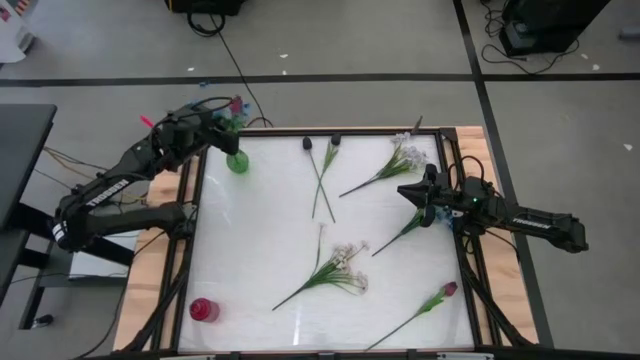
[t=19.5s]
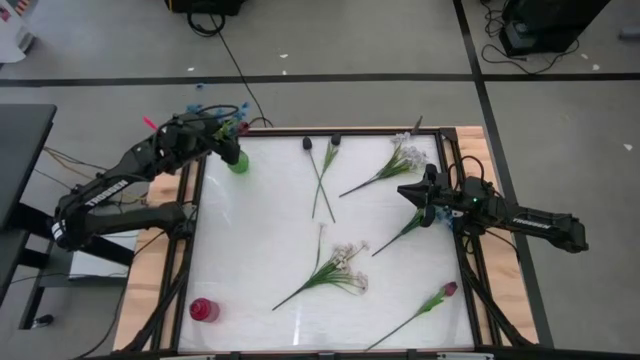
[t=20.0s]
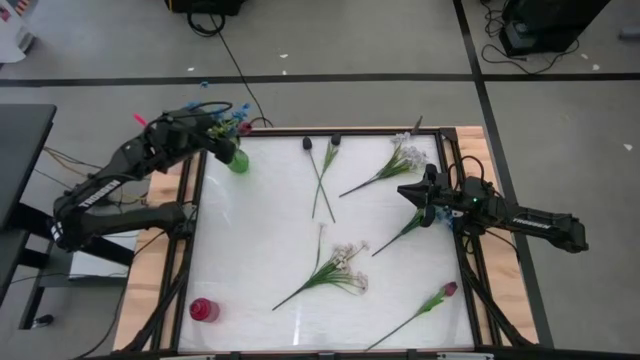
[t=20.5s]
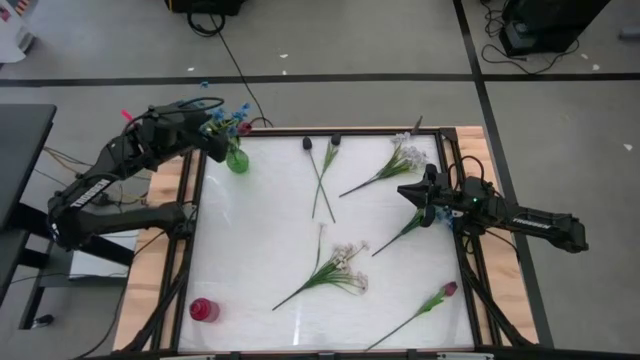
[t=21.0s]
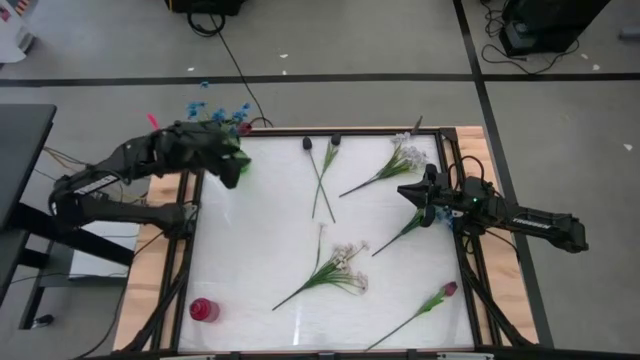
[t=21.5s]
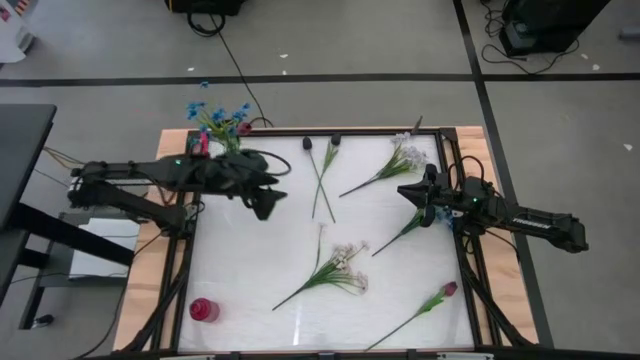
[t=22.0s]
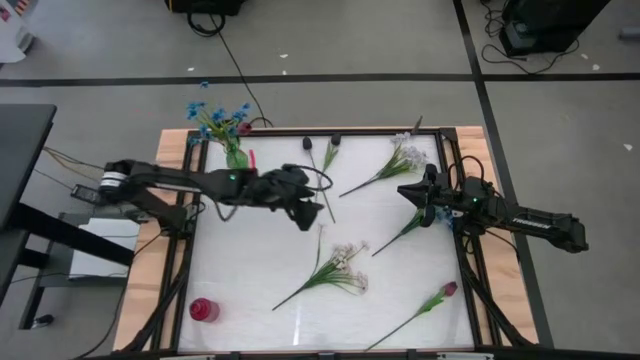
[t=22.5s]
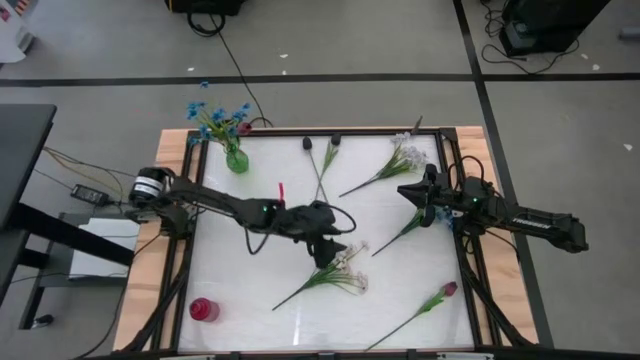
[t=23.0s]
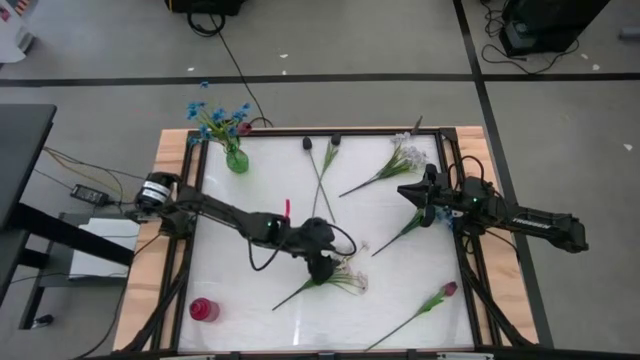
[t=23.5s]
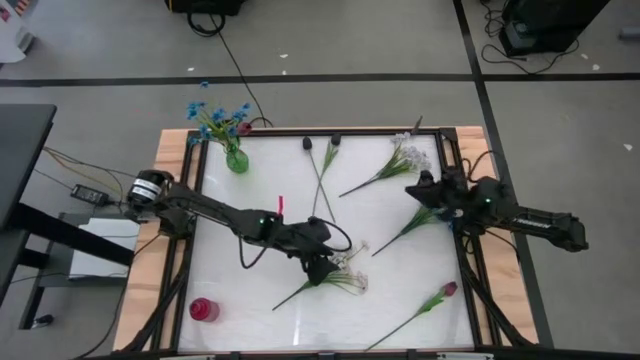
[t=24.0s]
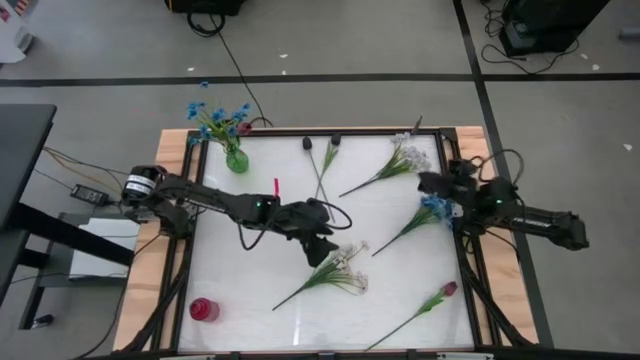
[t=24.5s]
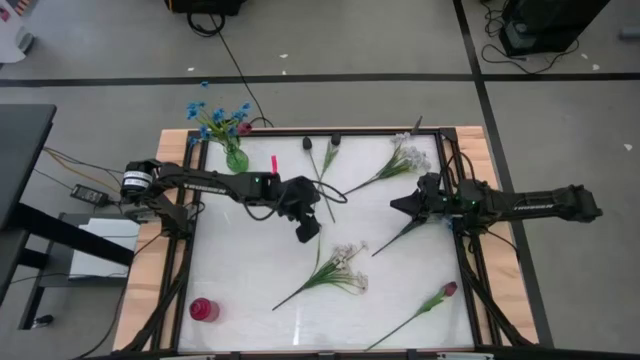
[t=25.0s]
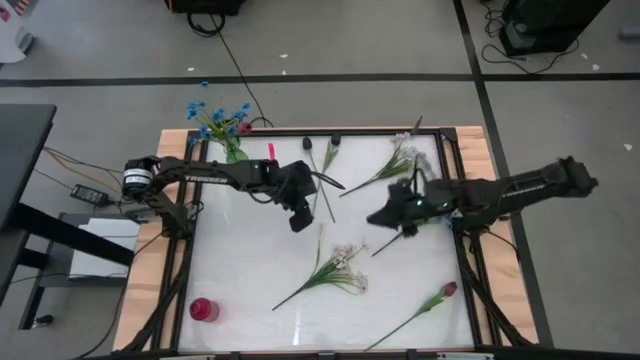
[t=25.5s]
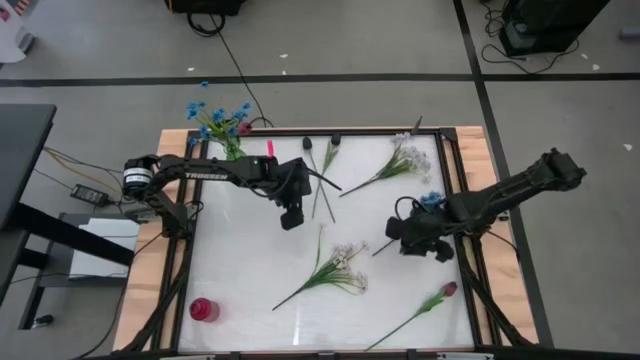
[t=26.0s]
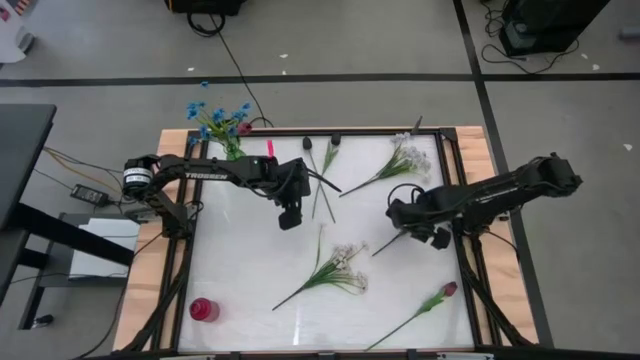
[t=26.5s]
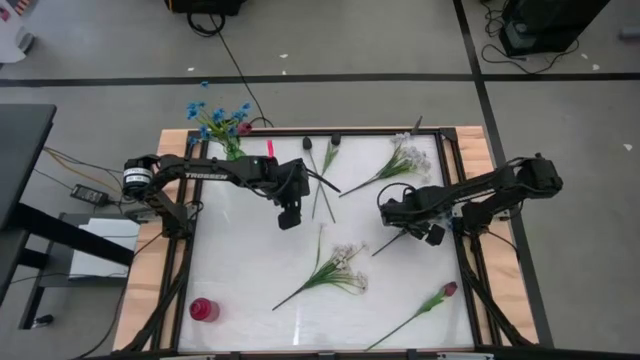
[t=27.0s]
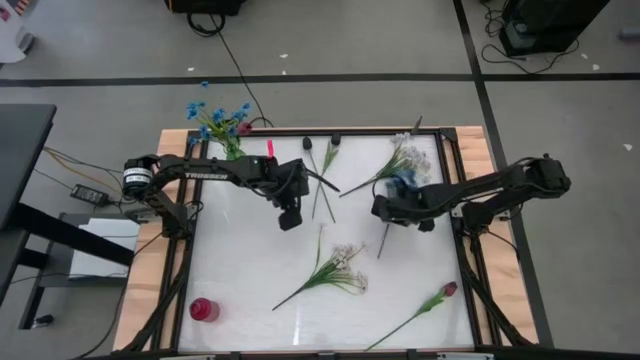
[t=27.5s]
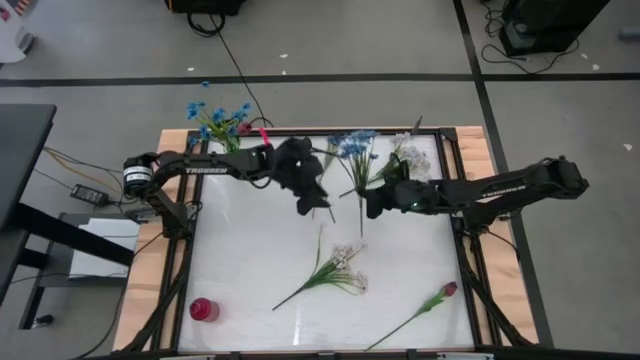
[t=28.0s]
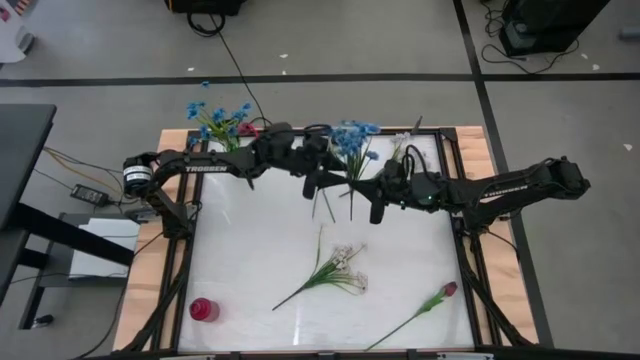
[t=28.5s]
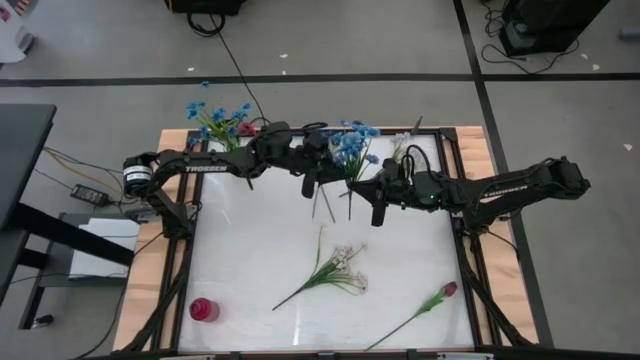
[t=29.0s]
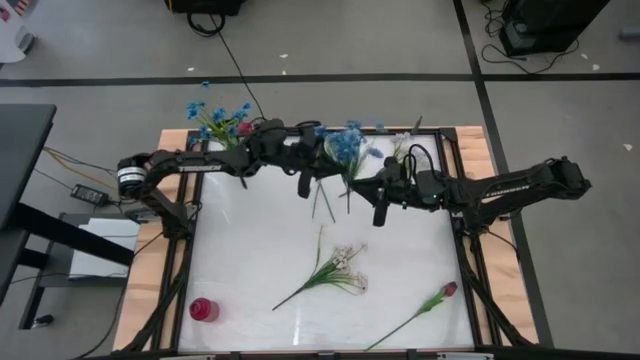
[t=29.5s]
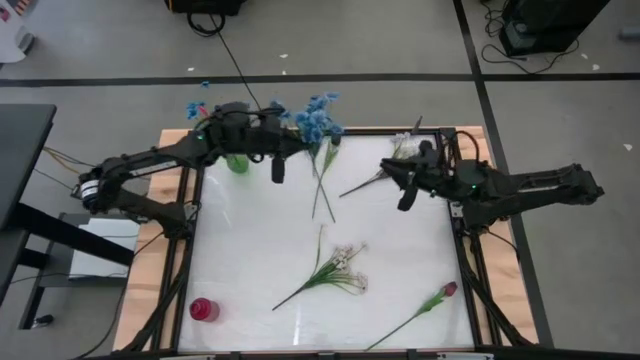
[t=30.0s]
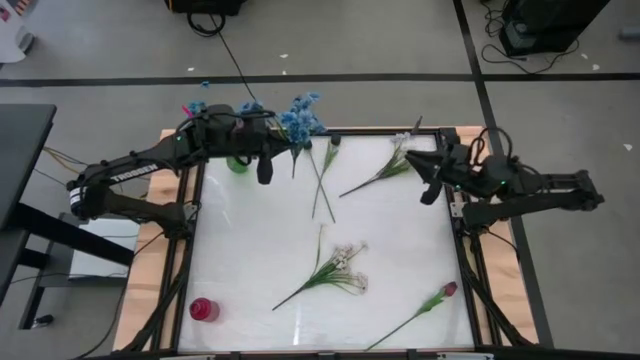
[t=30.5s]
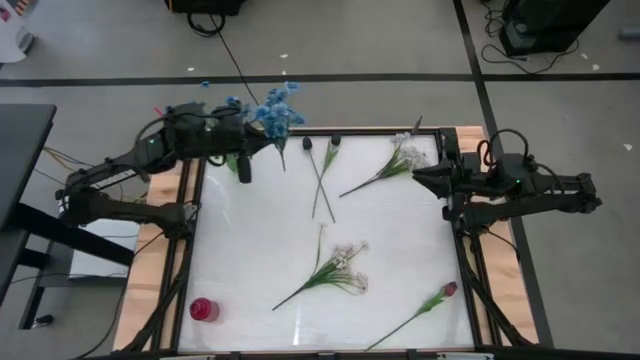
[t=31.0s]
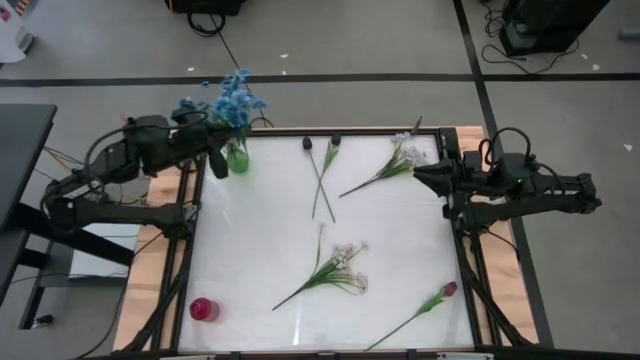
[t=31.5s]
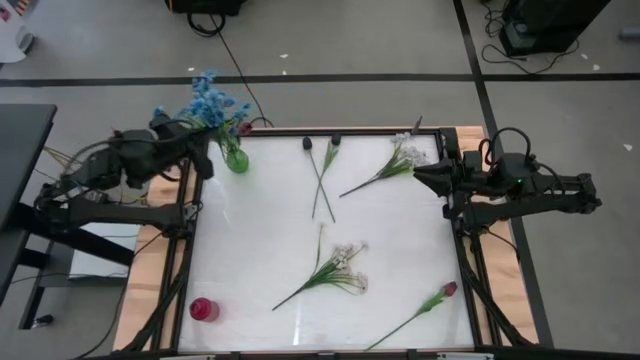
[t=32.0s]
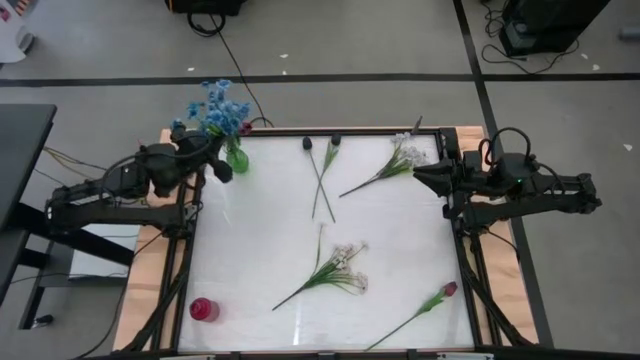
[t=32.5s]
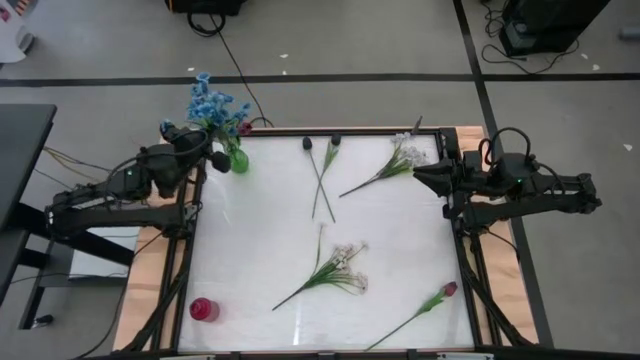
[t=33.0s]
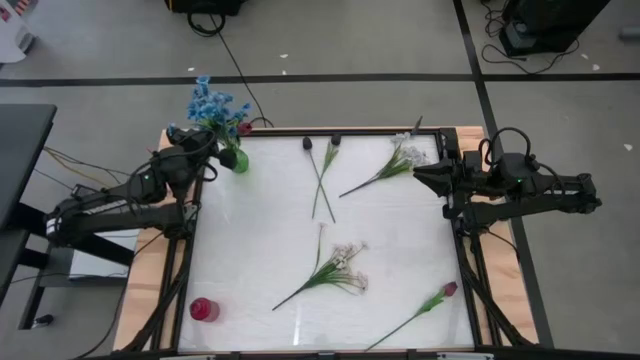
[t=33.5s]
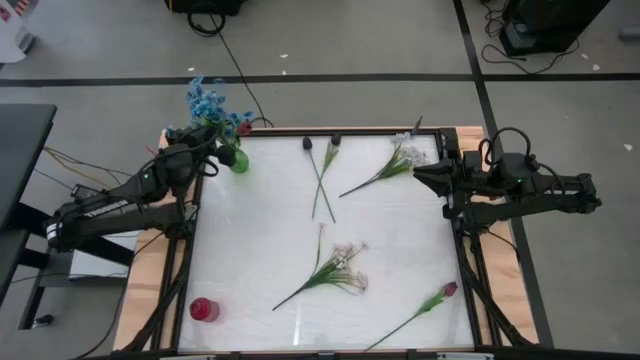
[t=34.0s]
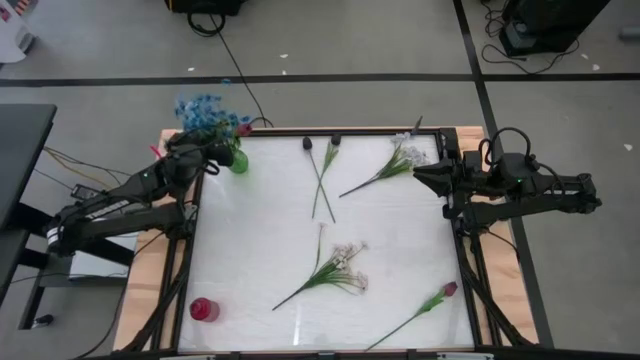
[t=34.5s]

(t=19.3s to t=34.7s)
Task: Sort flowers into vase by color
Put the blue flowers into the green vase

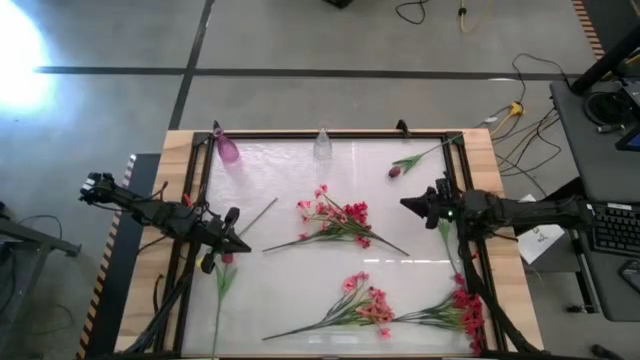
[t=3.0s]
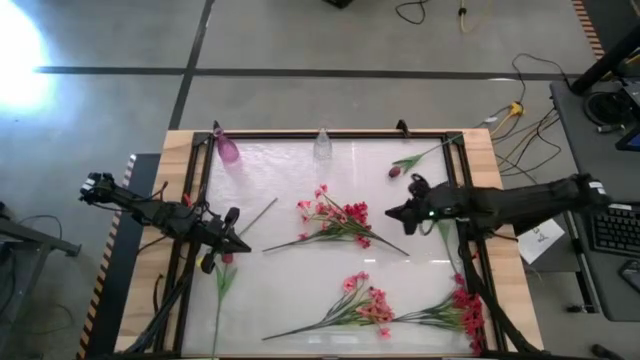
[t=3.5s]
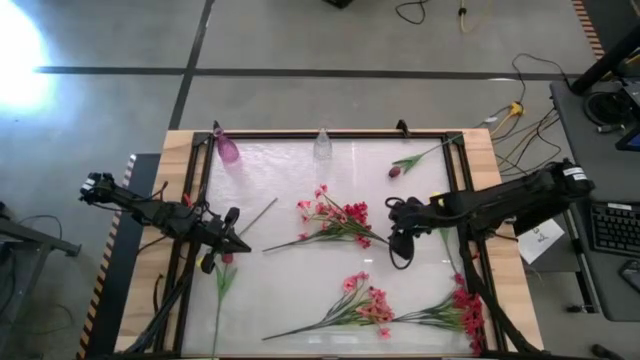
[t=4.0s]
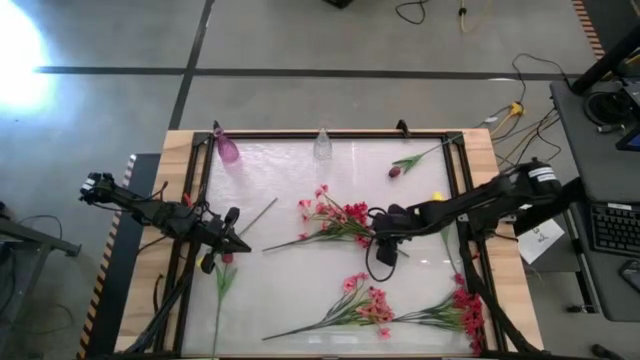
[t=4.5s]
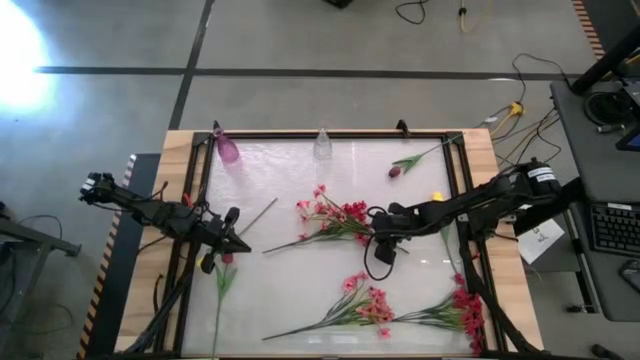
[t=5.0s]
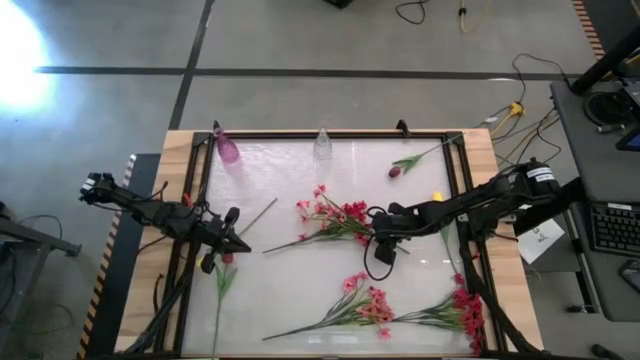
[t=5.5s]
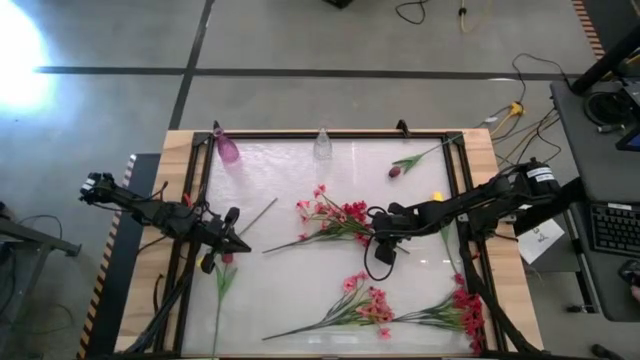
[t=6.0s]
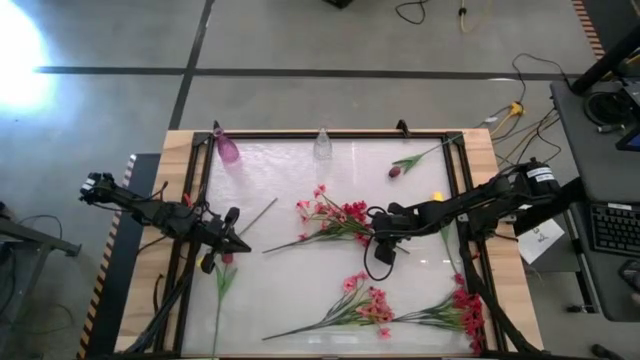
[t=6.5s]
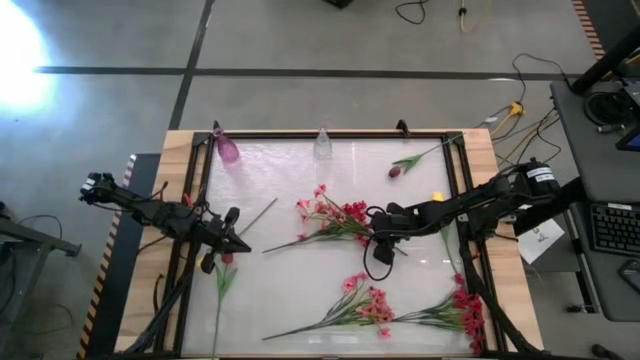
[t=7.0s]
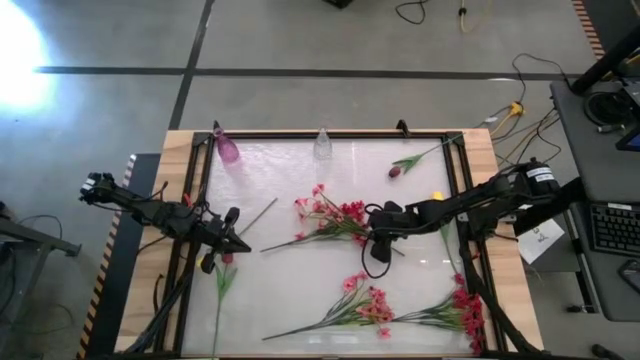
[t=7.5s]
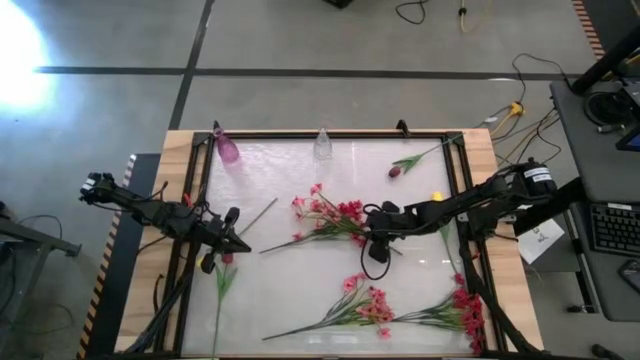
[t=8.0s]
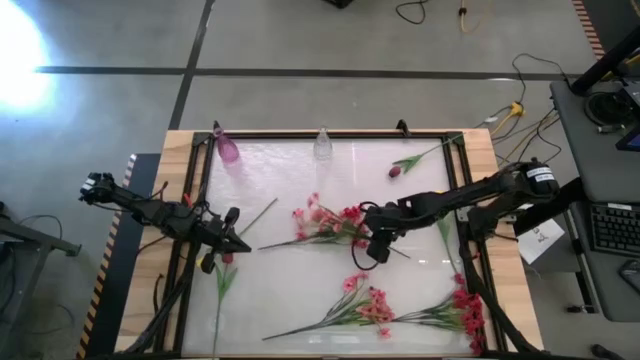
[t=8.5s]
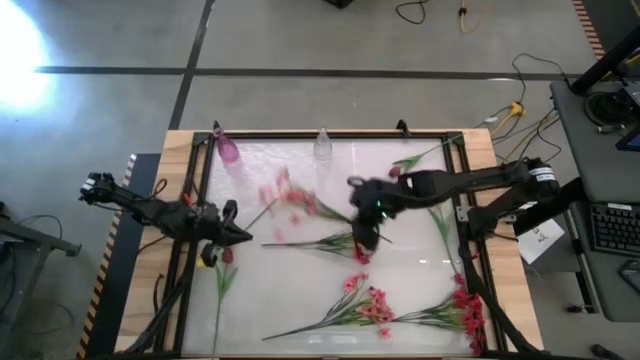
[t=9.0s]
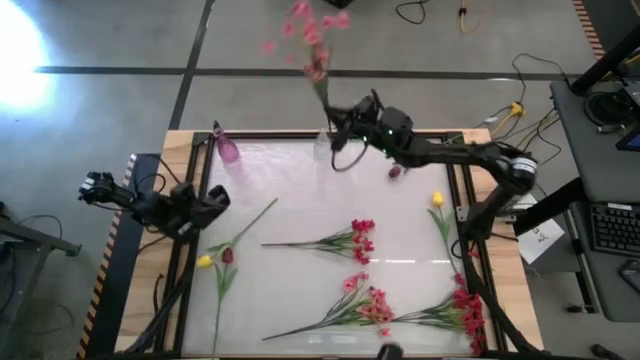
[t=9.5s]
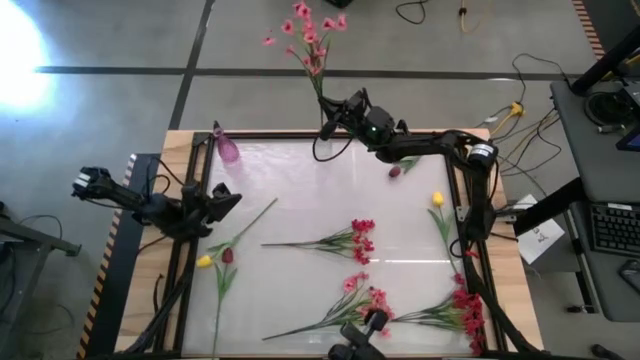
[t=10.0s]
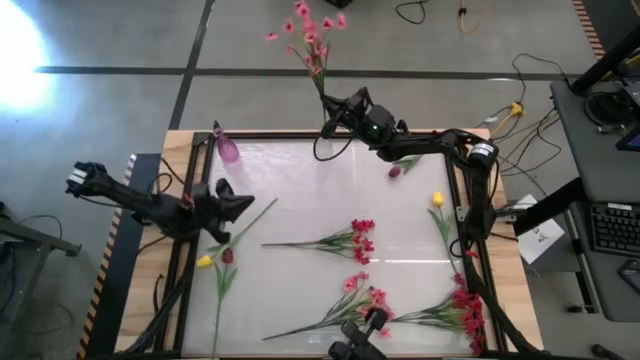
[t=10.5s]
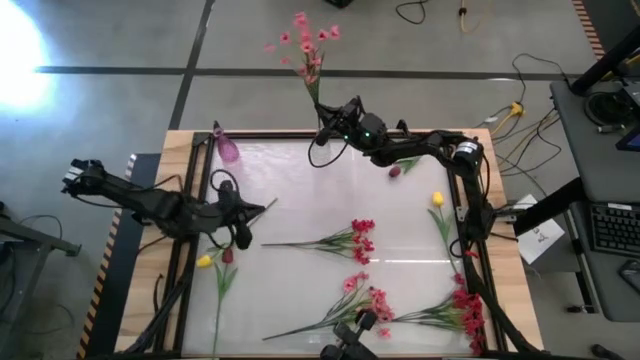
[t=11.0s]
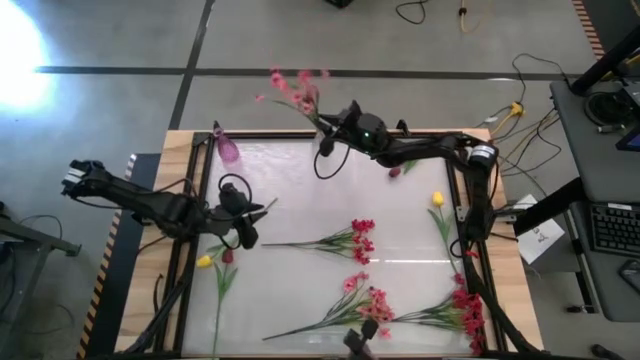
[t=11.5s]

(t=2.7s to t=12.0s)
Task: Sort flowers into vase by color
Put the top pink flowers into the transparent vase
